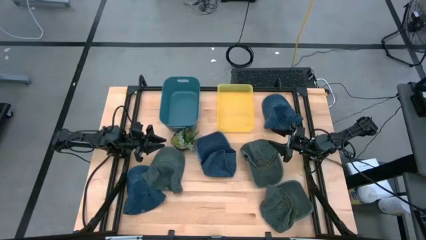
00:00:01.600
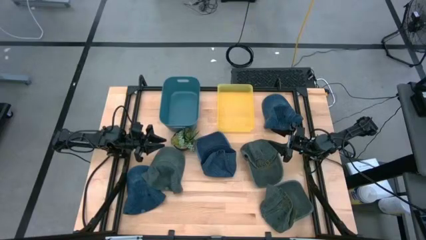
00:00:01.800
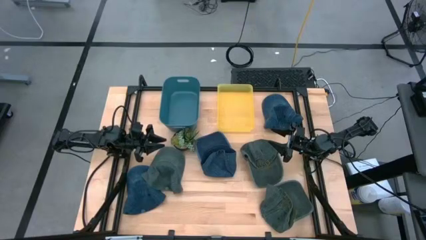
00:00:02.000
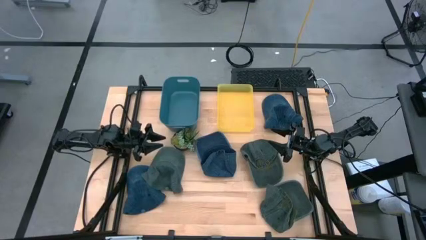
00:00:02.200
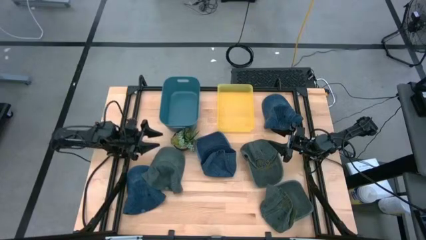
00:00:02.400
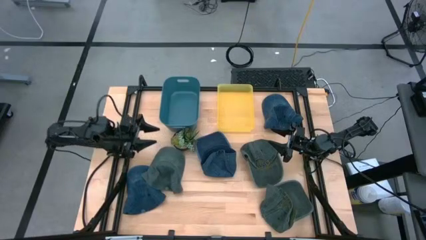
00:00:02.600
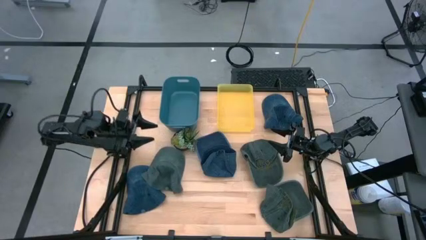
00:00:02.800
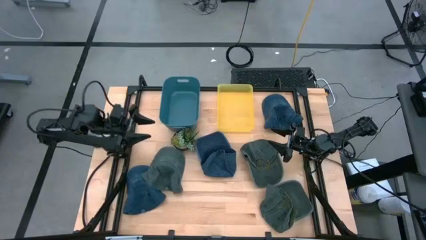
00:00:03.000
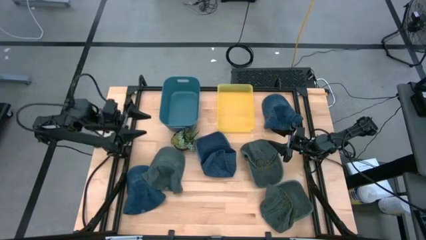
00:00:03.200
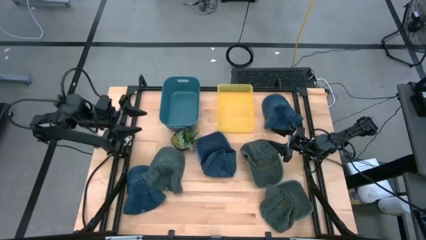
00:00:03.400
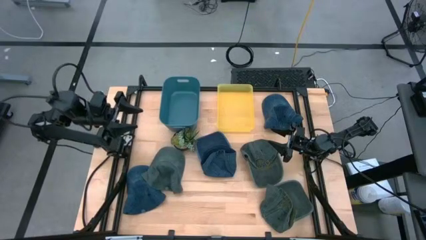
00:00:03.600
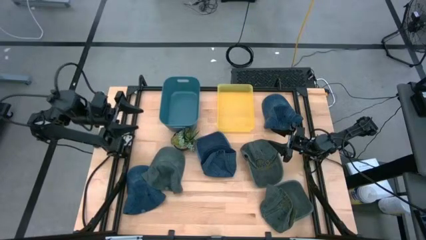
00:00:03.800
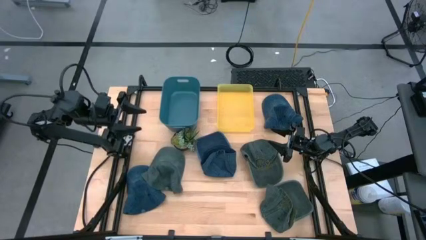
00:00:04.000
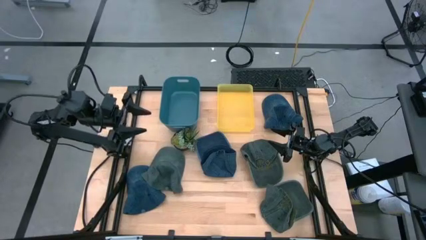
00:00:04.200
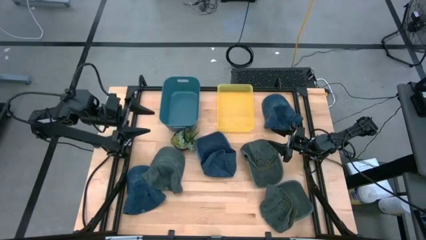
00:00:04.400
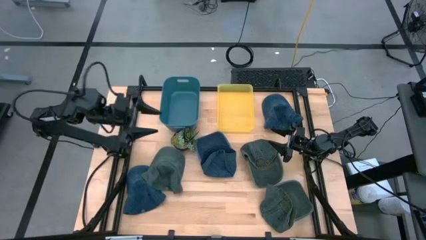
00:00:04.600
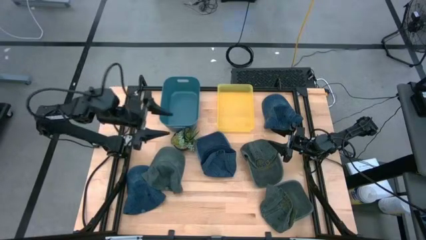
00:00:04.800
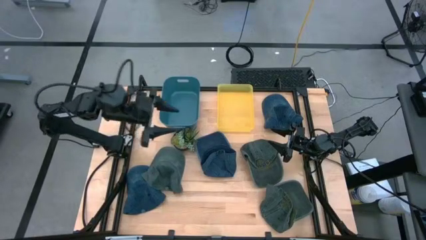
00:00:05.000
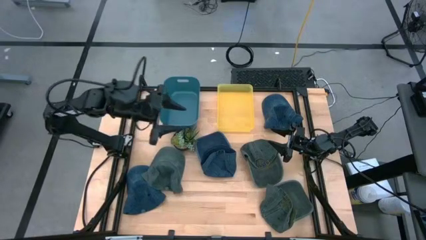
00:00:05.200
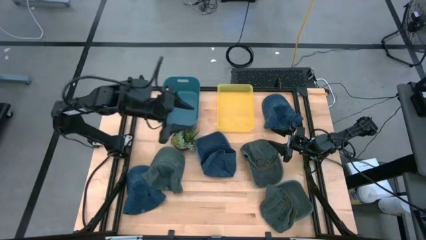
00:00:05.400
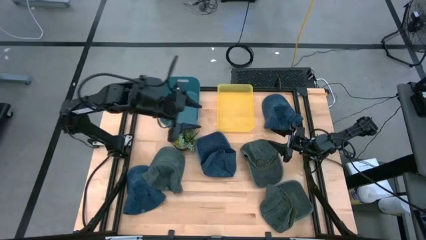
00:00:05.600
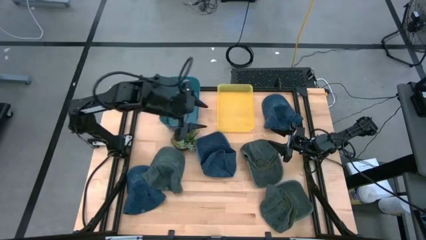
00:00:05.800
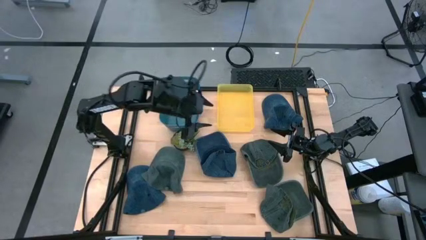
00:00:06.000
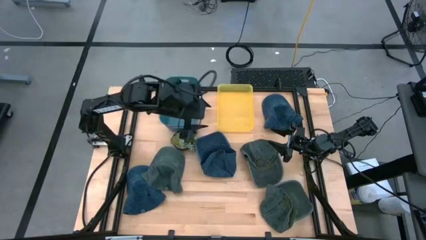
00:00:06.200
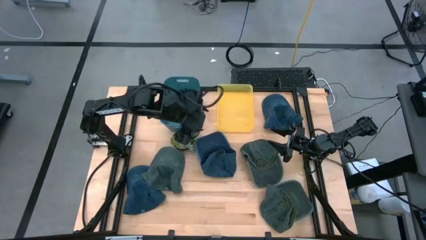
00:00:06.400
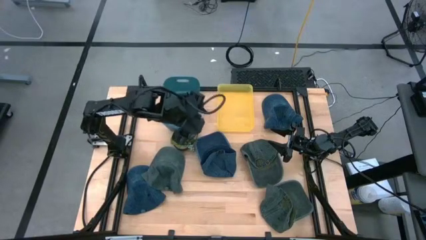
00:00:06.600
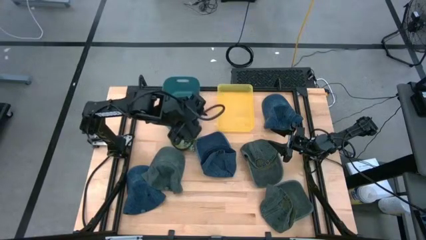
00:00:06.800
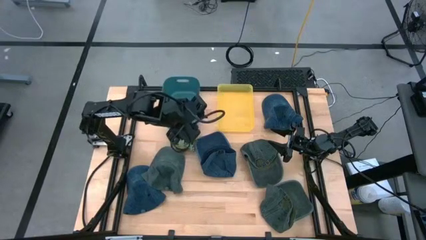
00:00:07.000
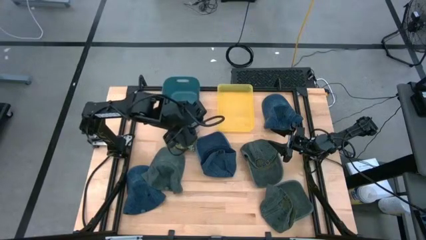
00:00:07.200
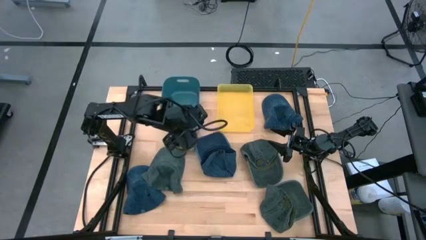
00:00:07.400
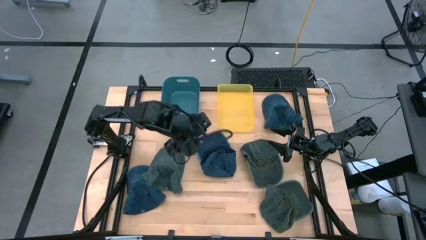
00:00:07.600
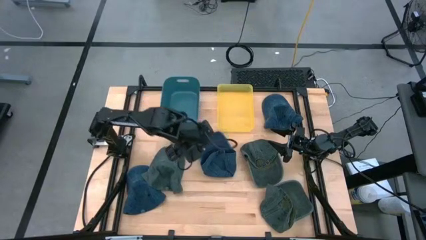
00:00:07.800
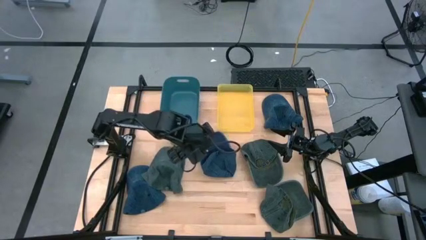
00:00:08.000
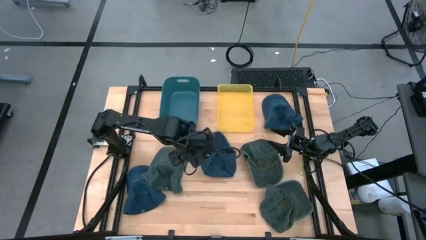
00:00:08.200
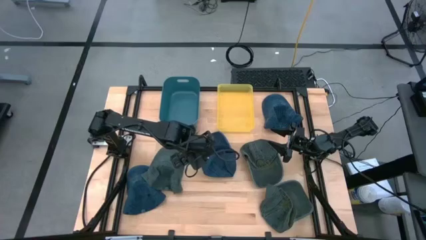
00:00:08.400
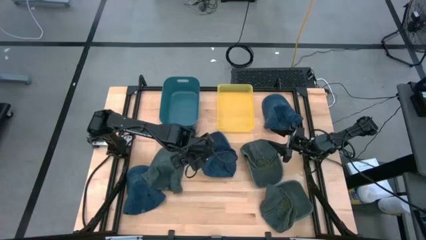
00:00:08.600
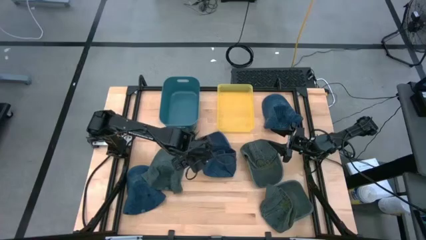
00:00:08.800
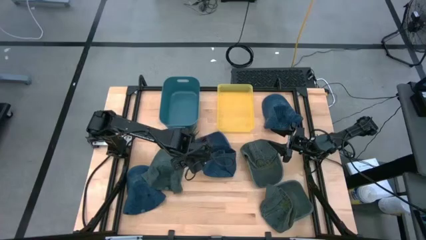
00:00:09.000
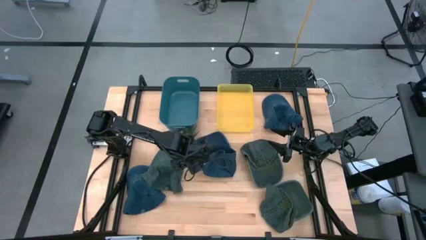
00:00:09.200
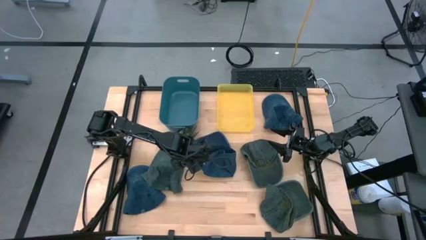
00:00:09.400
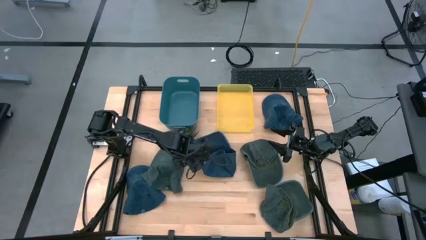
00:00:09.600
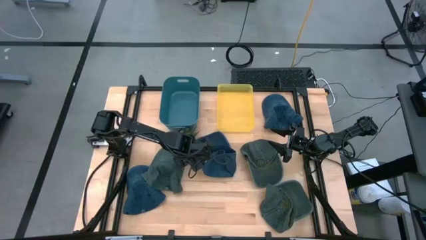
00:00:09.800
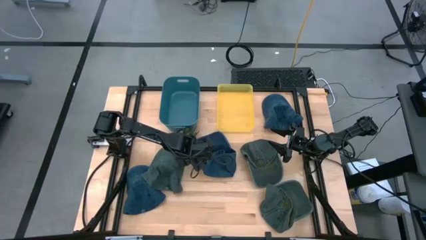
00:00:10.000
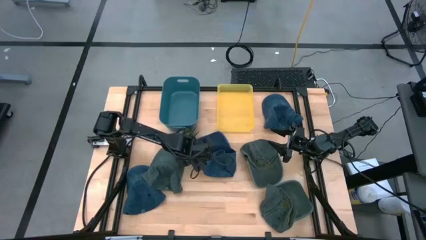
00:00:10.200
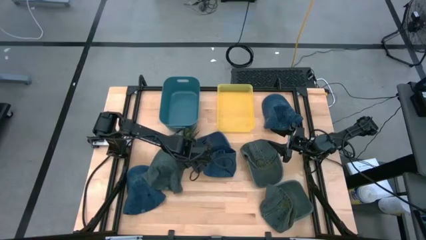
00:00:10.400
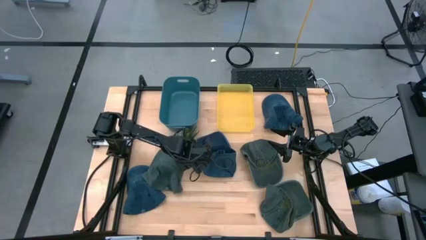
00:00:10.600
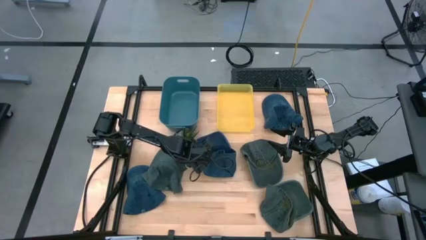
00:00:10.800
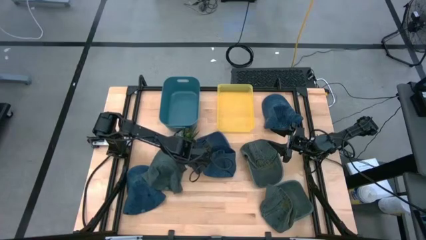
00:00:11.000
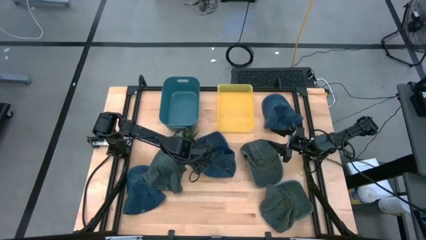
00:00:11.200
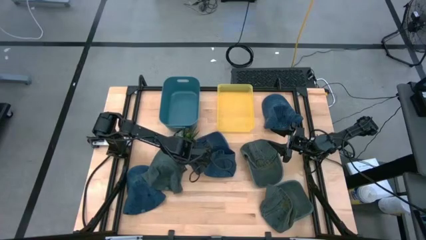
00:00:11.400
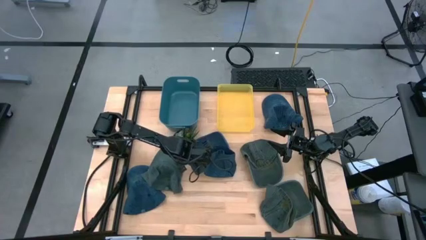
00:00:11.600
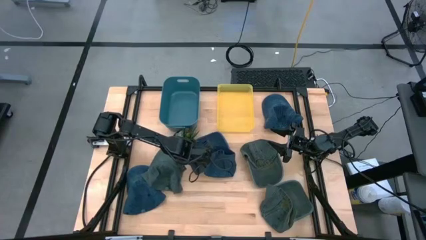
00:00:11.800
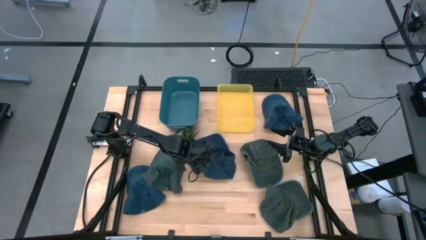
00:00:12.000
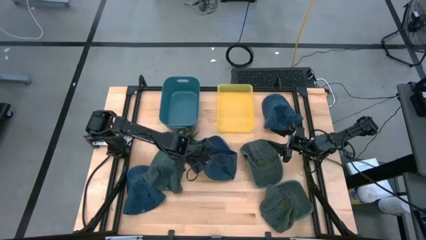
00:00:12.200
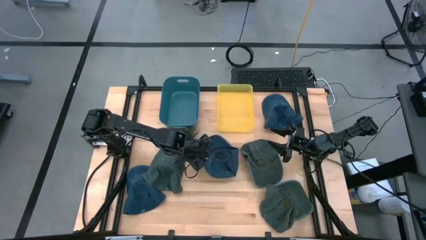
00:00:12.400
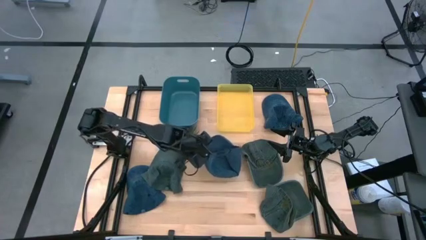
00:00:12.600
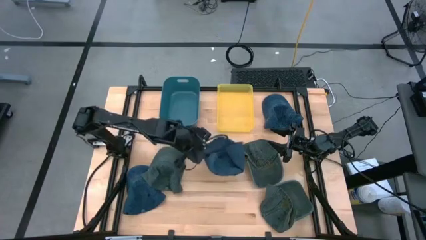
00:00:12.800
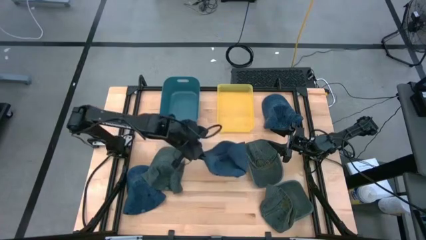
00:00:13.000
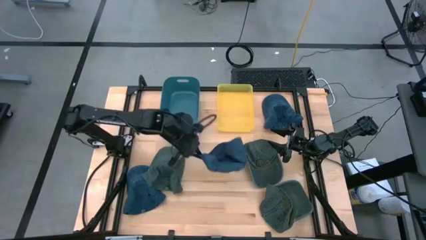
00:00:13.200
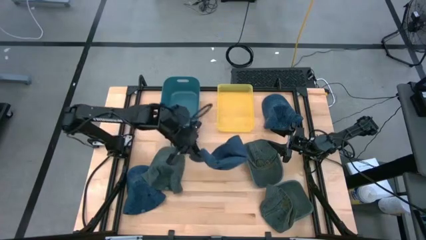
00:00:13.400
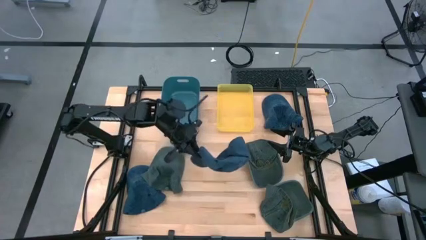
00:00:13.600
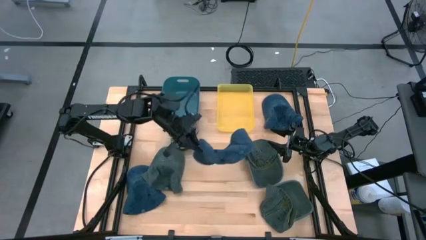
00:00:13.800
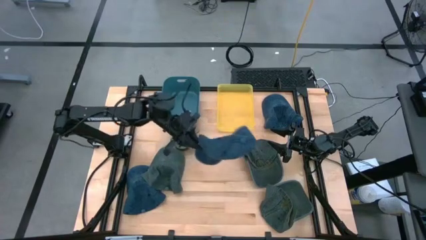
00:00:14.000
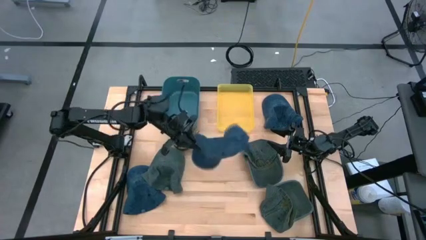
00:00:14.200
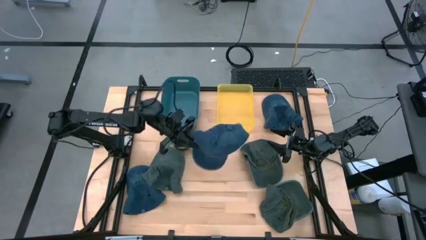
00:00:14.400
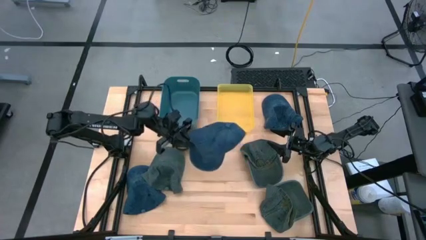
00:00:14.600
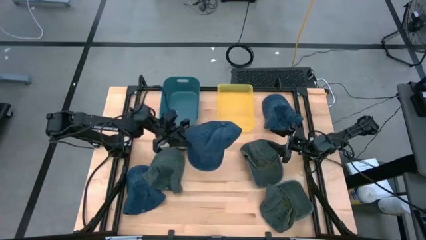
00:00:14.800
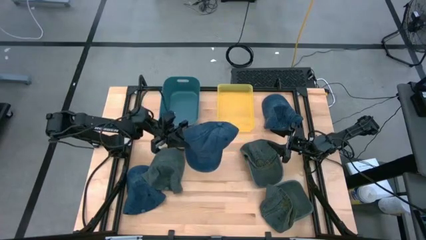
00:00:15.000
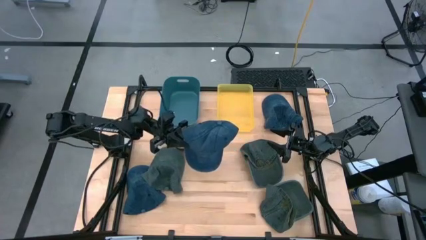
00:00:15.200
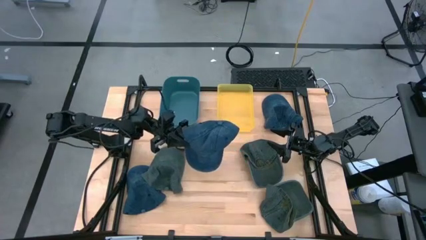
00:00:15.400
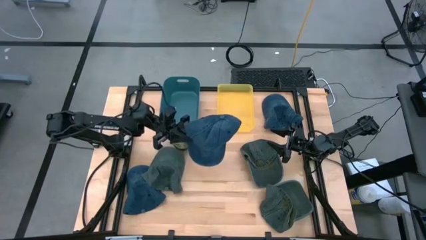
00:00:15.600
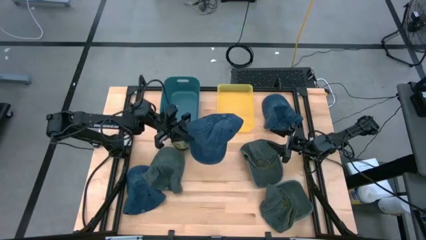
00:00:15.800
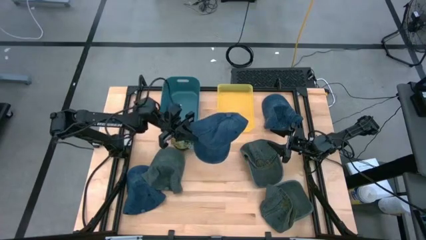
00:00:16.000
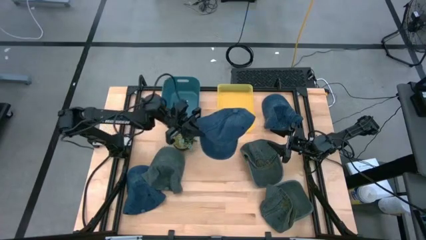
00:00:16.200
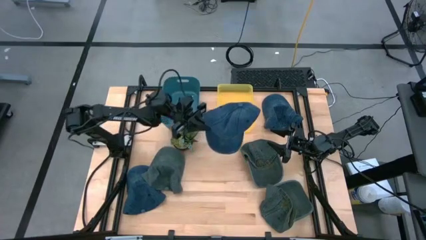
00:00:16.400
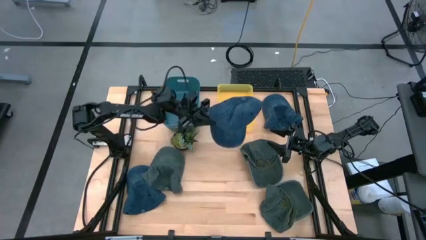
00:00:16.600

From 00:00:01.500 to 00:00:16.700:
Task: Pick & Place hat
Put the middle blue cap into the yellow bin
